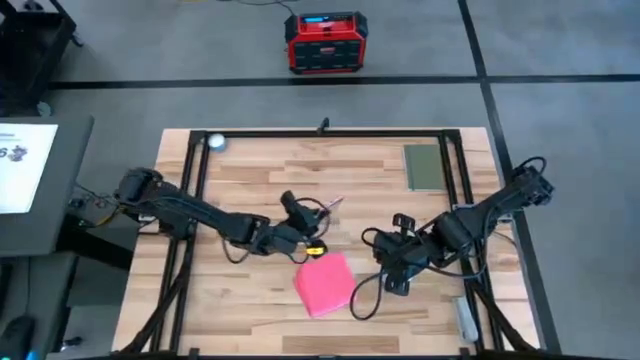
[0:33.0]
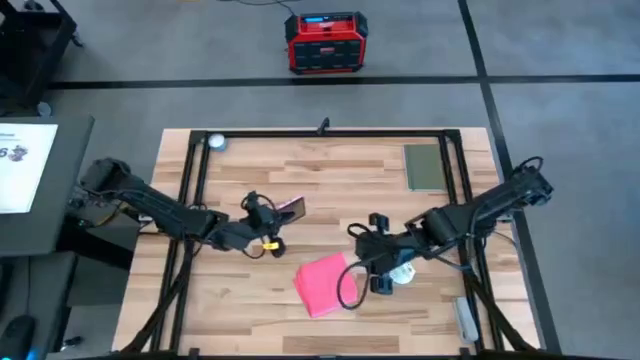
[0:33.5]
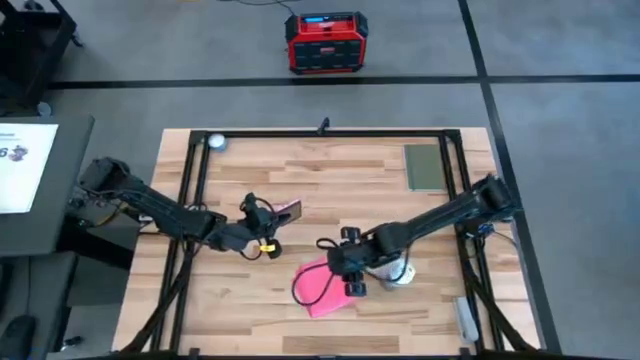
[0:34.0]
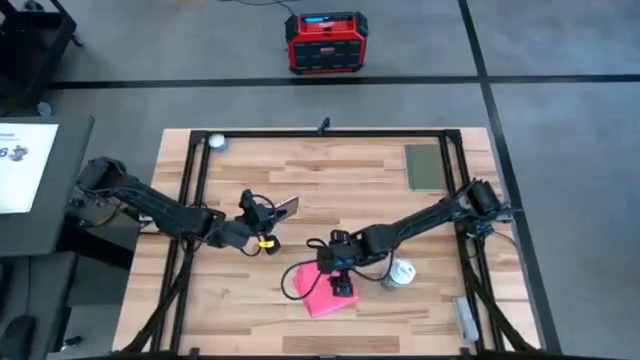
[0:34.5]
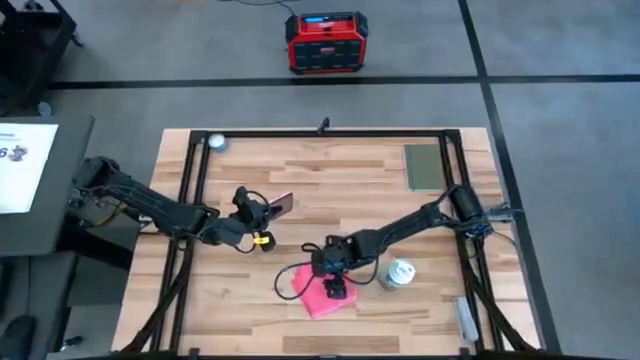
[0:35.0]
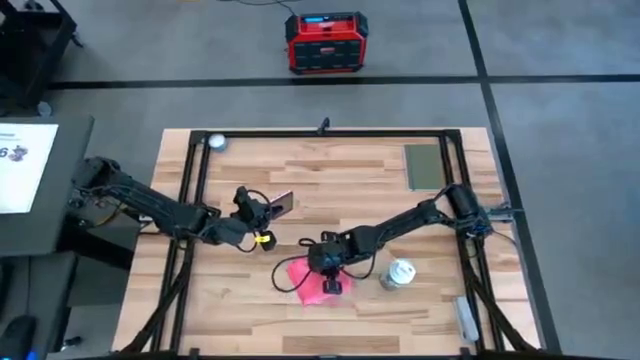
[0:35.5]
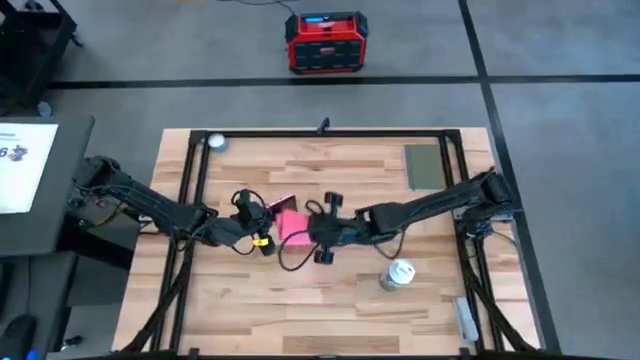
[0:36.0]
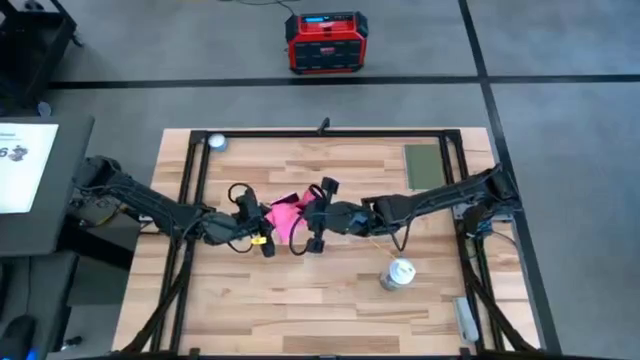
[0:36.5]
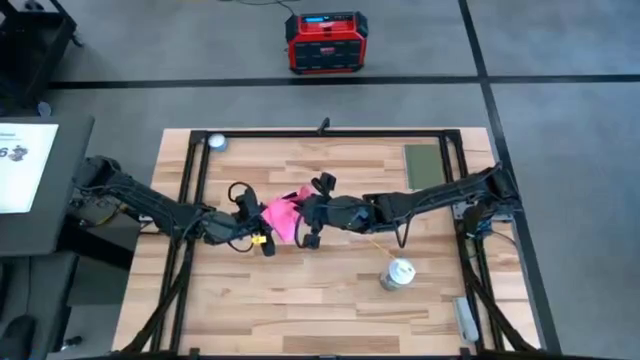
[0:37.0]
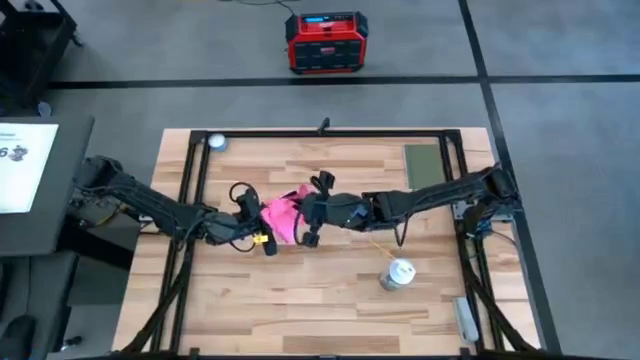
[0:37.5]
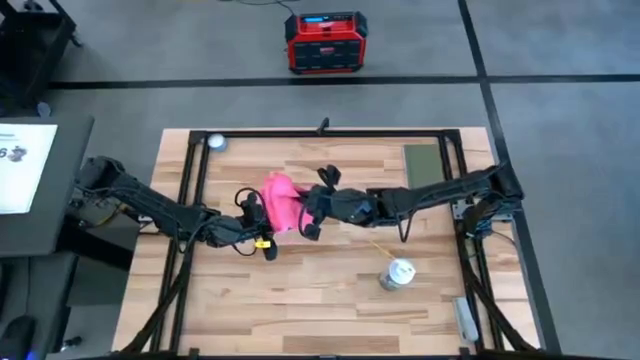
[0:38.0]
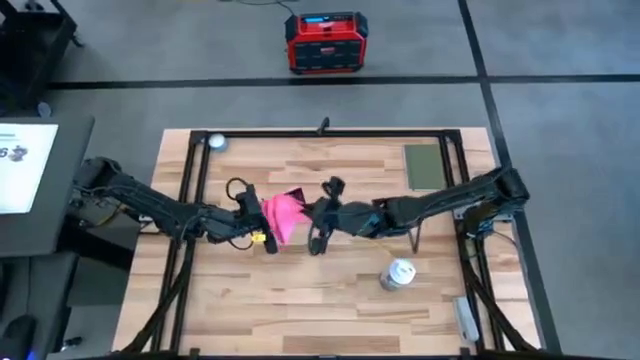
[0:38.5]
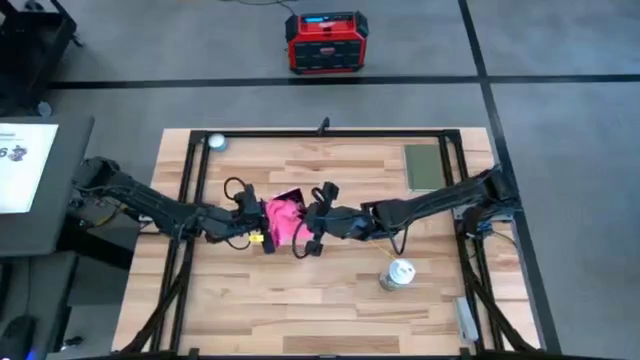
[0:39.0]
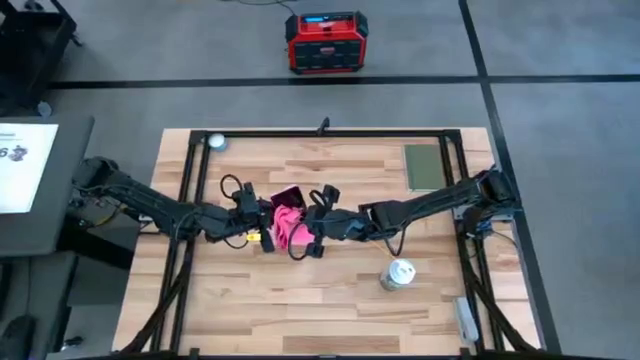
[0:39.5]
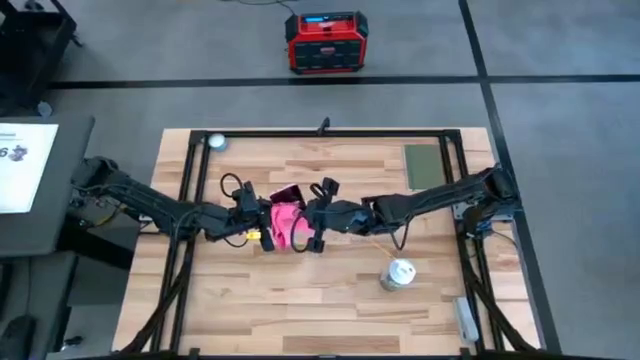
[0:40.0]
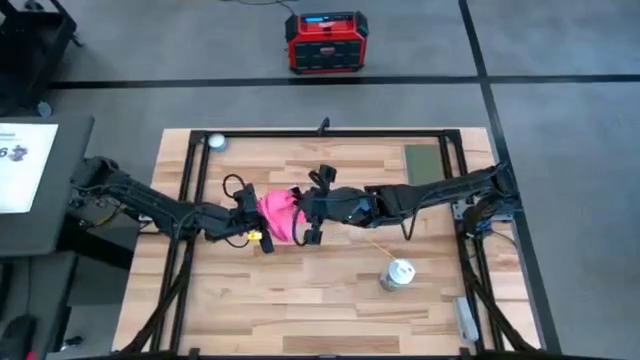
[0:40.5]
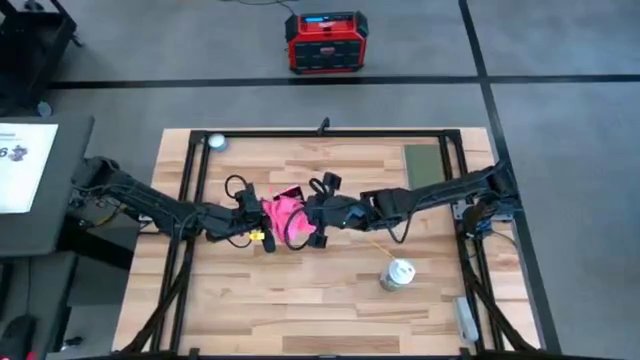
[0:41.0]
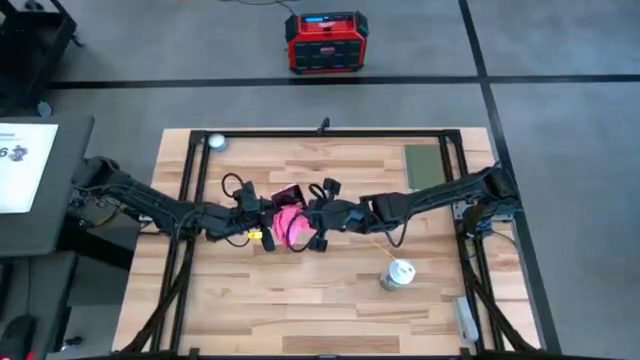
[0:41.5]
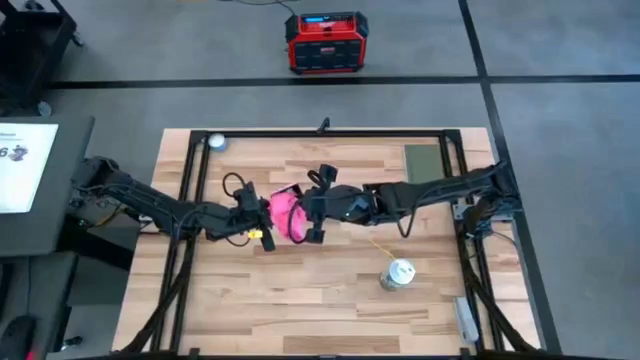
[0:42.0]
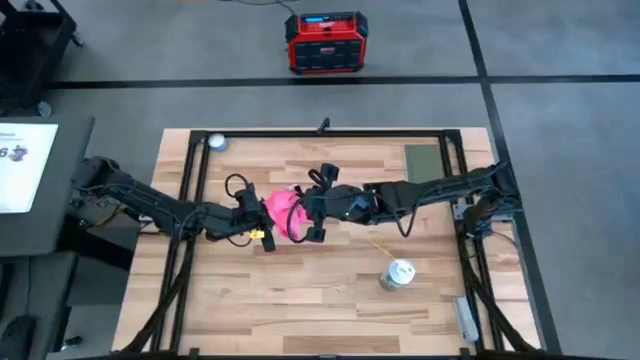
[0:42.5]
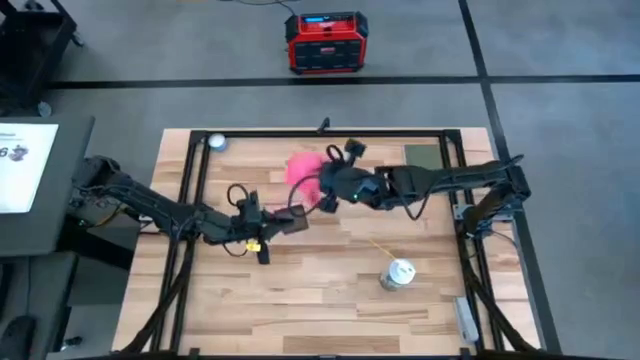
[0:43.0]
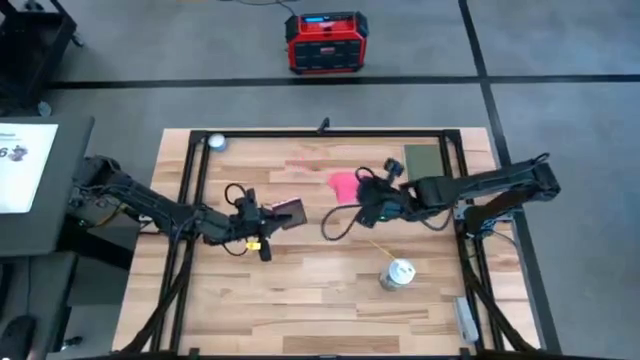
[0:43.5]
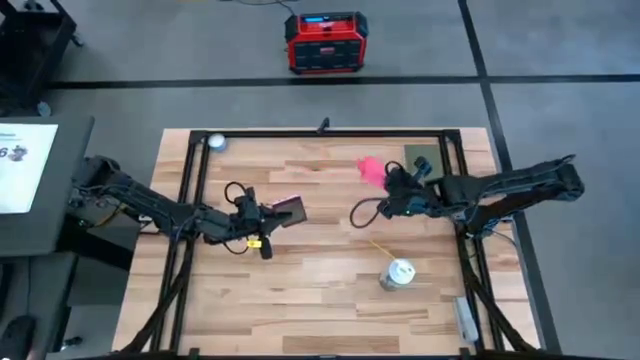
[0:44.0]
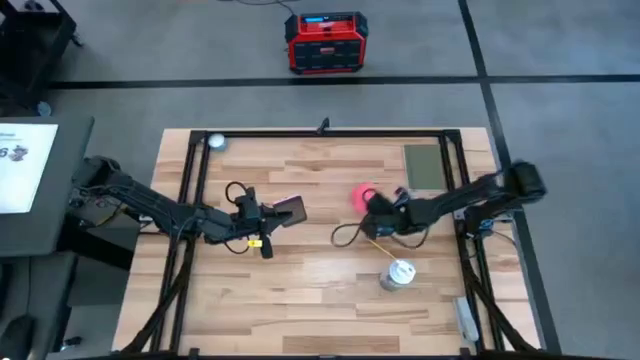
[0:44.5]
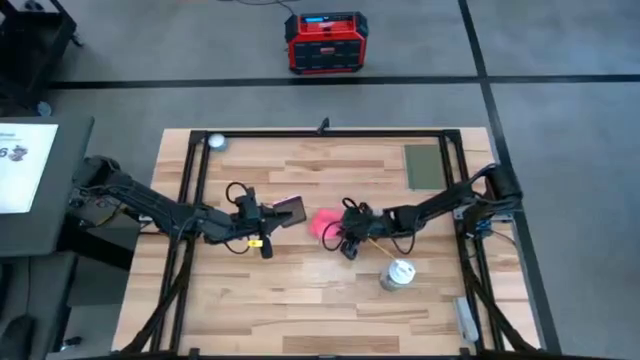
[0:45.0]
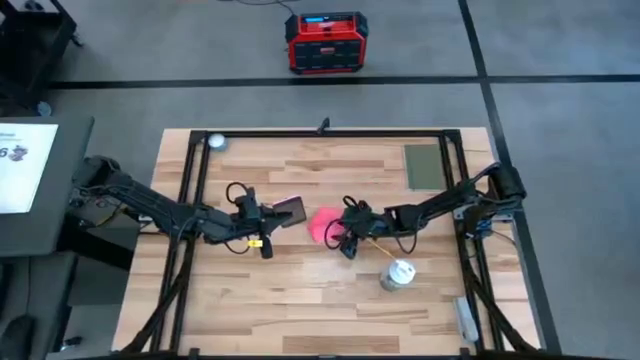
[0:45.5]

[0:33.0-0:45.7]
Task: Apply microfiber cloth
Wipe the front of the phone using the pink microfiber cloth

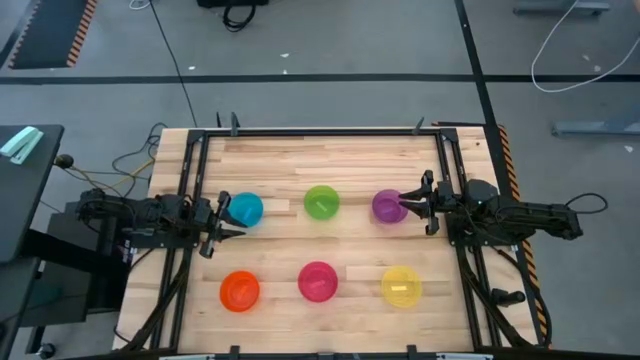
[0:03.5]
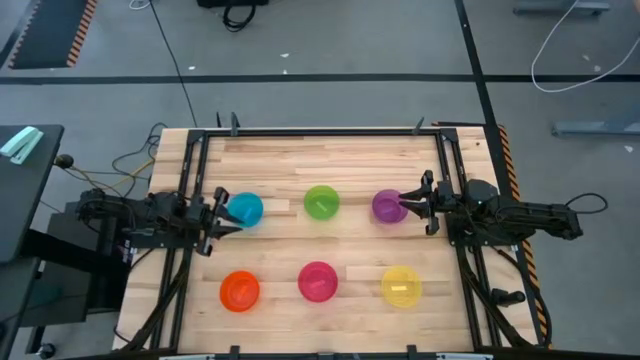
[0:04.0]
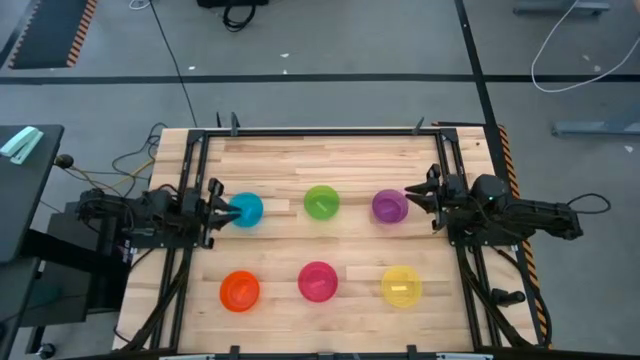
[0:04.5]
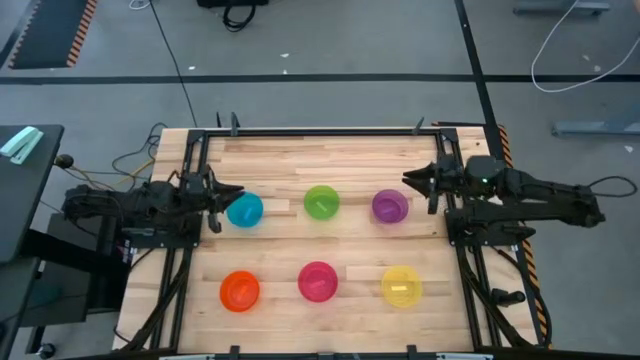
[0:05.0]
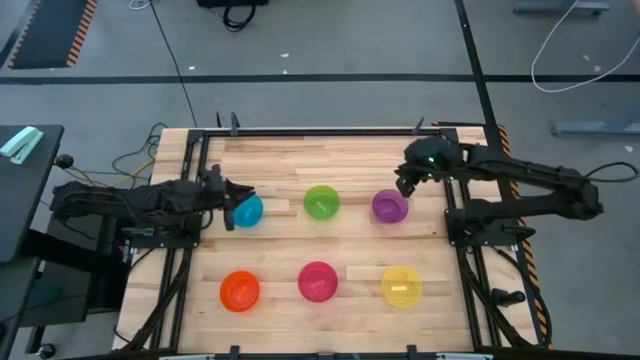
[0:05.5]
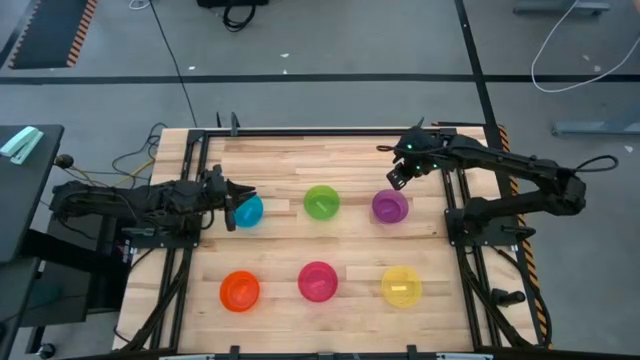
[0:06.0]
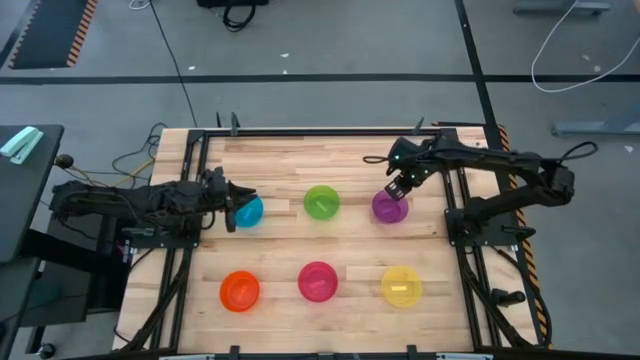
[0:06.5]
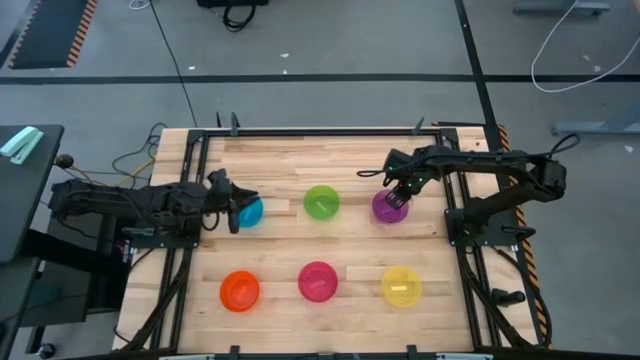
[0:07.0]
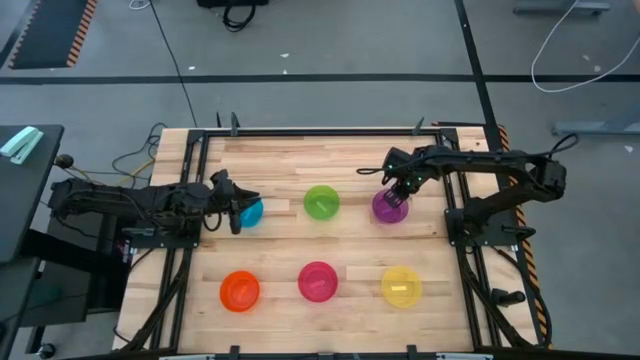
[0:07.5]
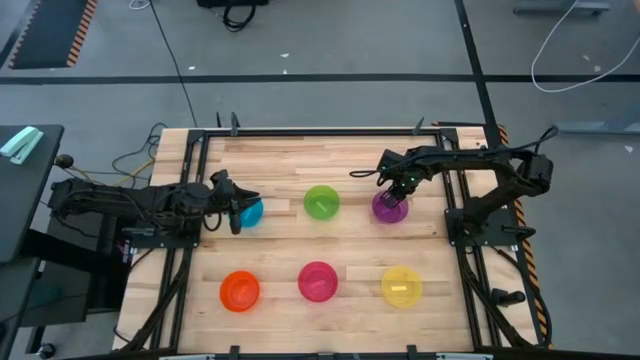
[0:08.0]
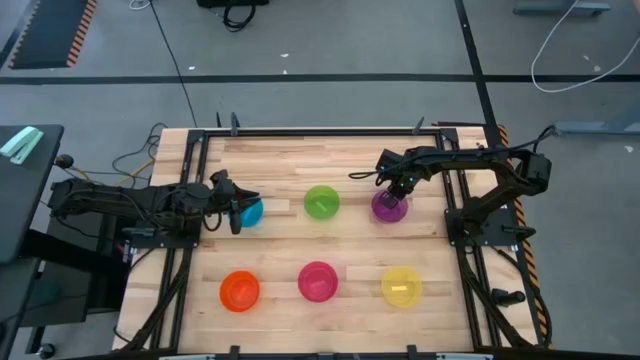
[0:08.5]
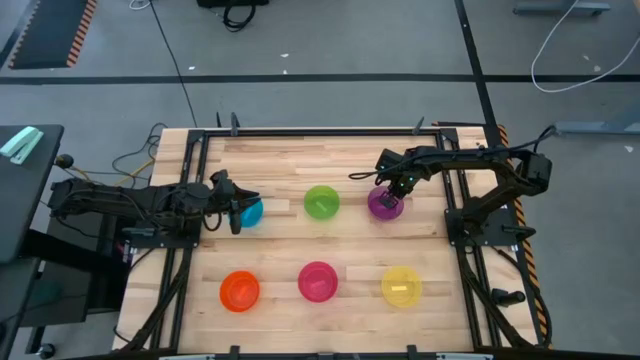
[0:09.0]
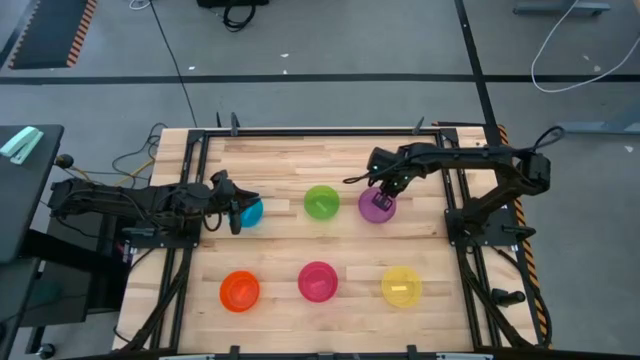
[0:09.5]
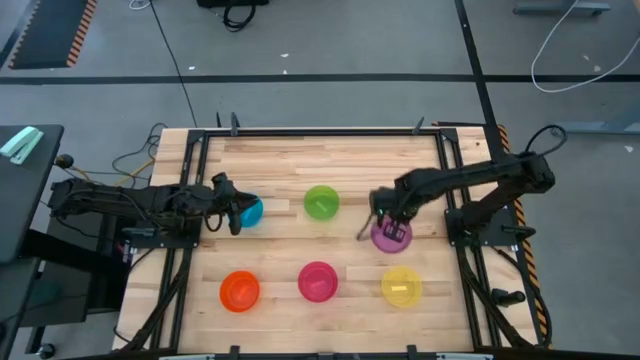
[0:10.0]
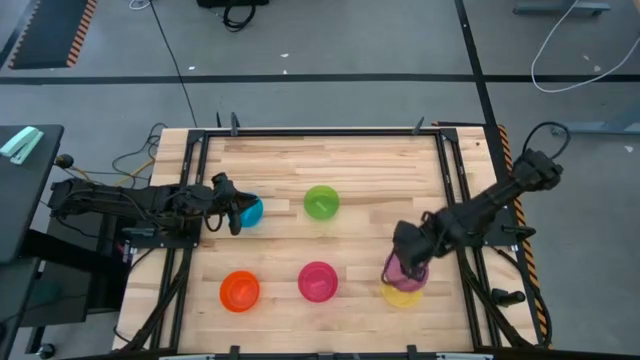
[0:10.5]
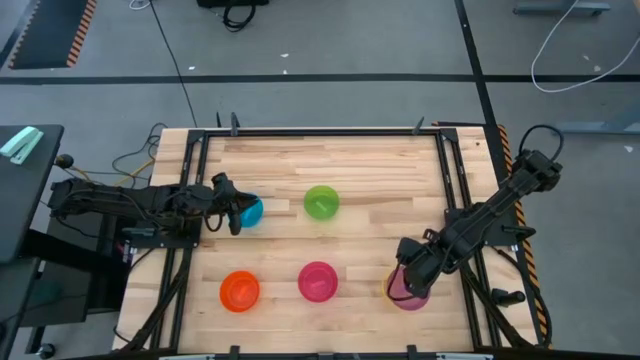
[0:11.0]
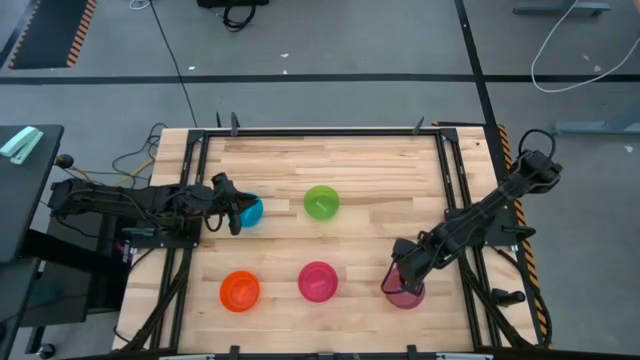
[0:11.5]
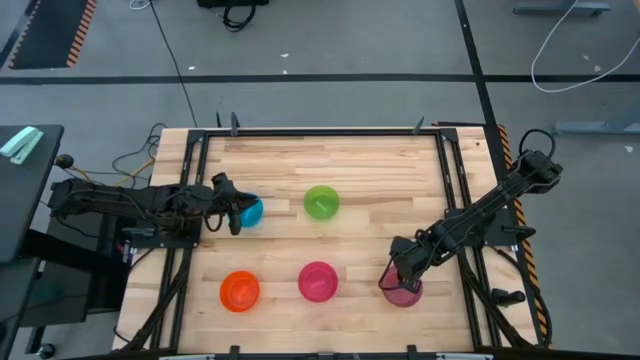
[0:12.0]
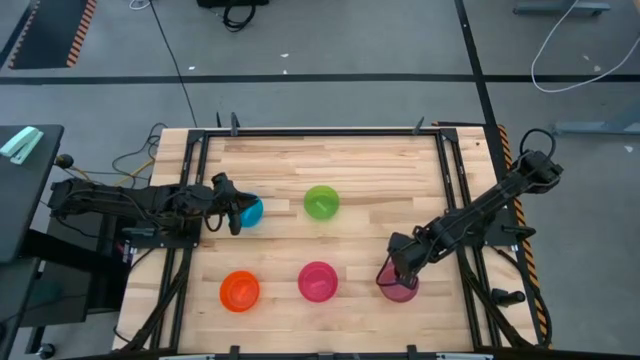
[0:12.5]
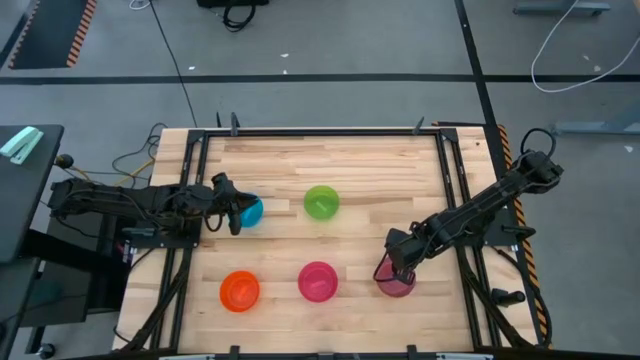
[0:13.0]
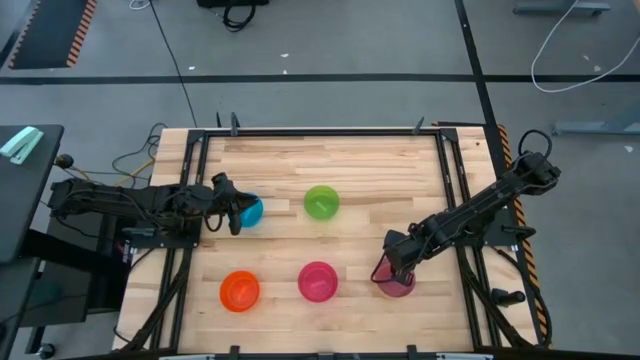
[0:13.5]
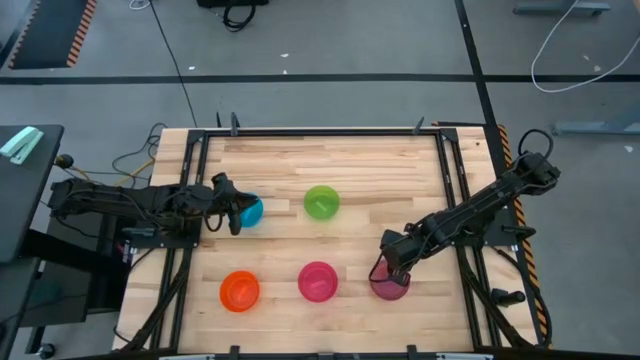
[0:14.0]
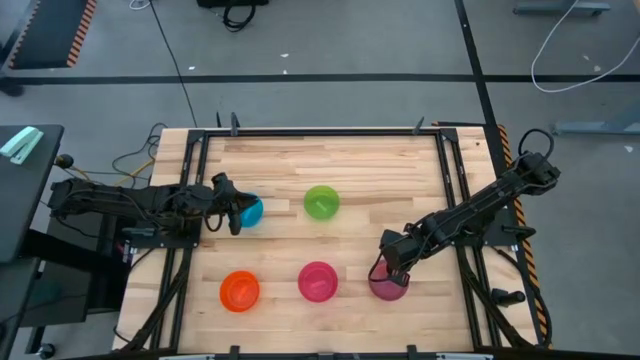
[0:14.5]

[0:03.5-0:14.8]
Task: Nest bowls inside each other
Stack the purple bowl on the yellow bowl
